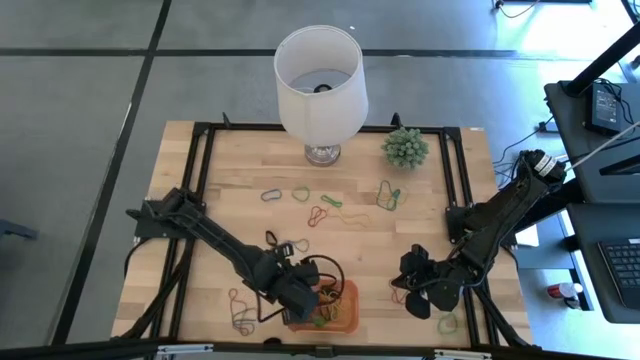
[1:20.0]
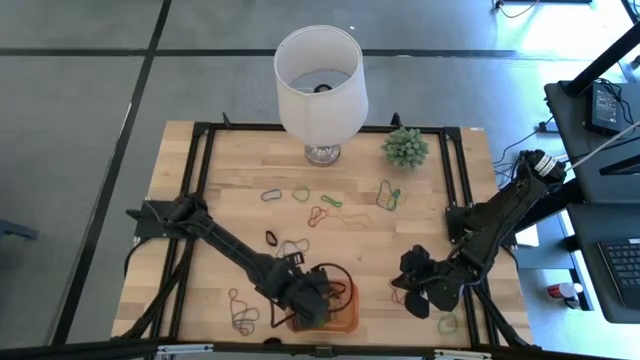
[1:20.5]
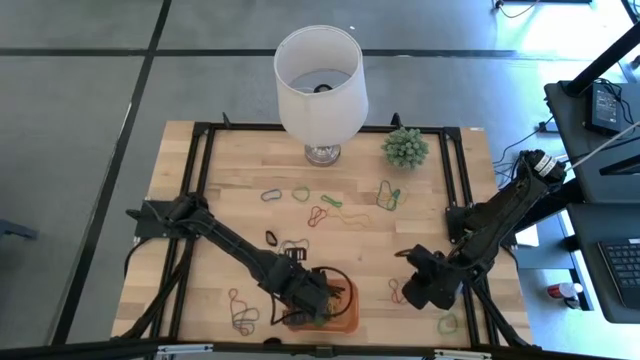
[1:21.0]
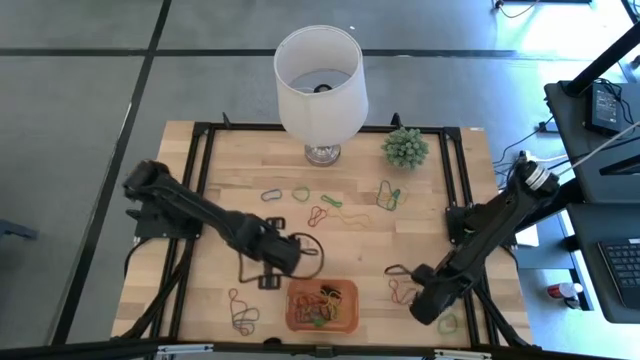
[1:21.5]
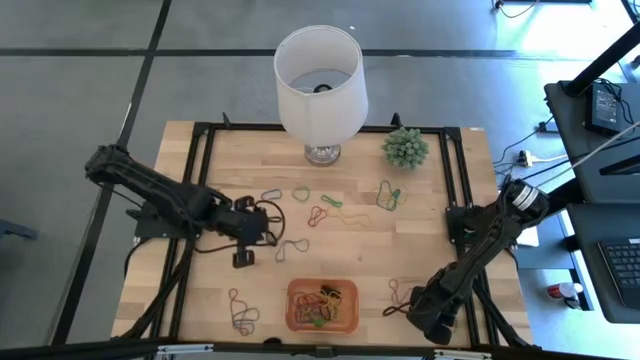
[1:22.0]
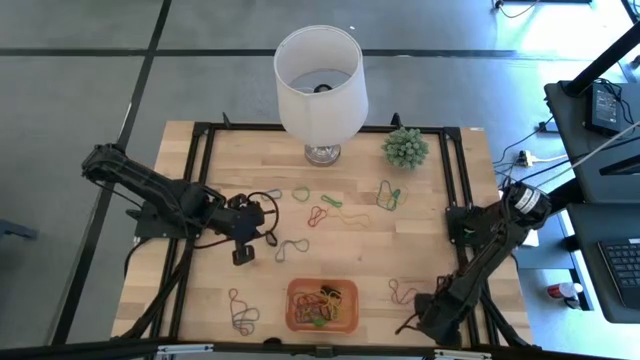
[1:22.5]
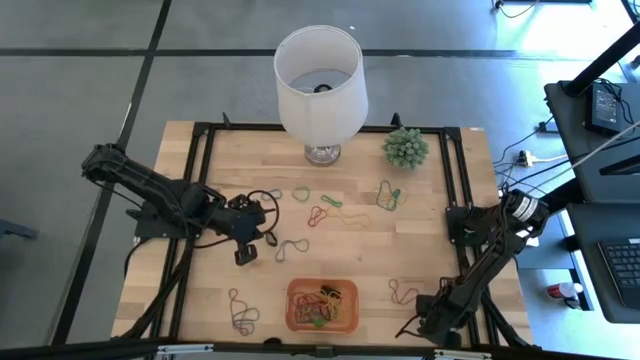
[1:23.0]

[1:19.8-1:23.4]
Task: Pick and place rubber bands into bin
Put the green rubber band into the orange bin

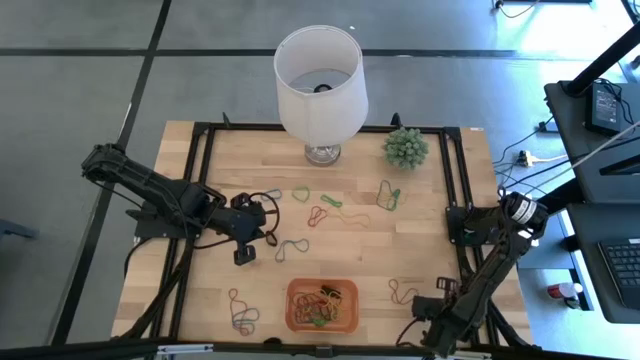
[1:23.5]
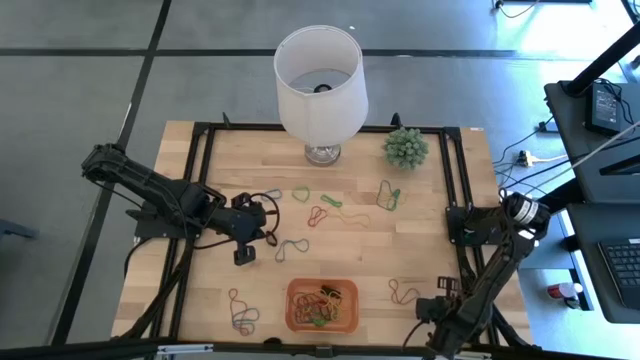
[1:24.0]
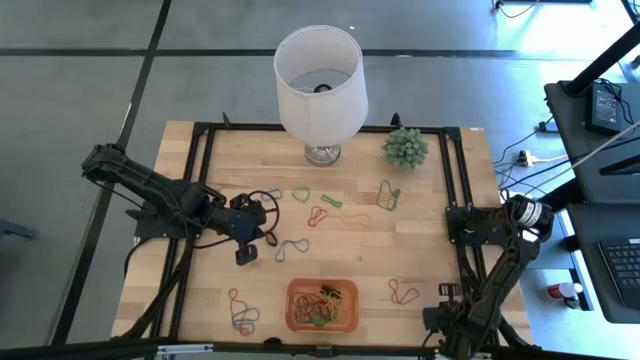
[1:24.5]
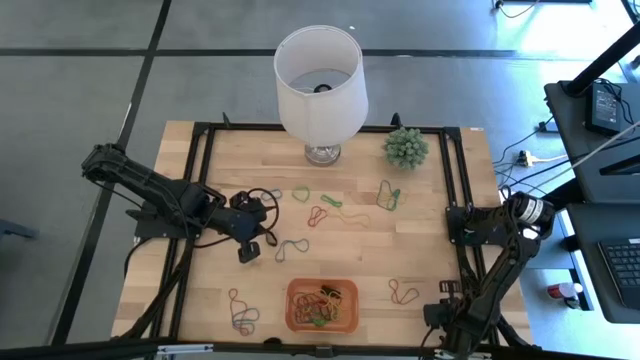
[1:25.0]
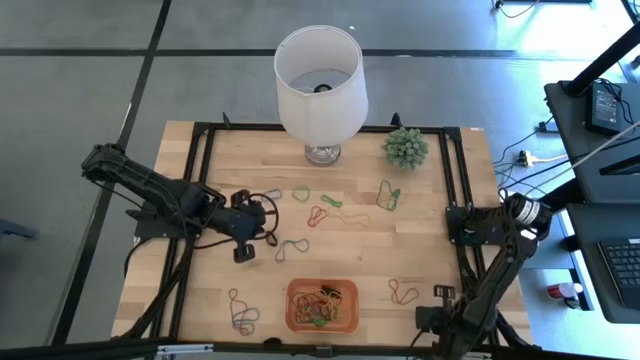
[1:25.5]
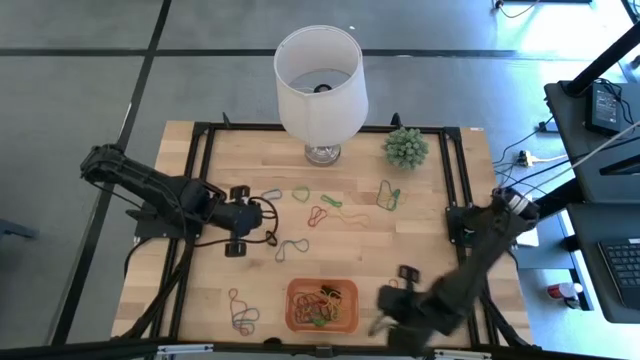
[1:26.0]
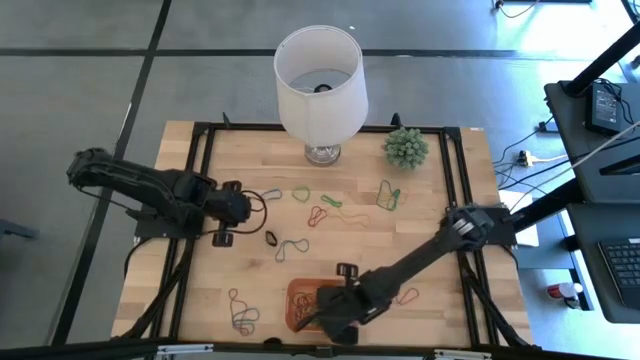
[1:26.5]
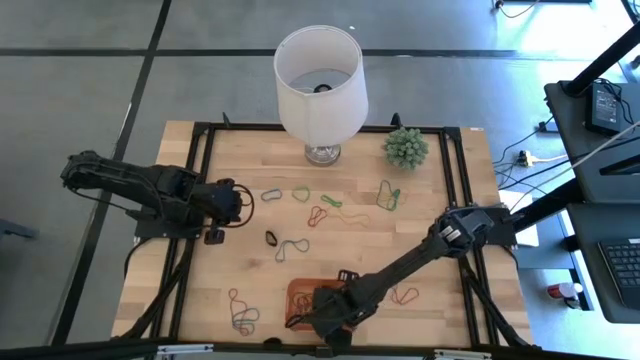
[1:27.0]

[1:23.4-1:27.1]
Put the green rubber band into the orange bin

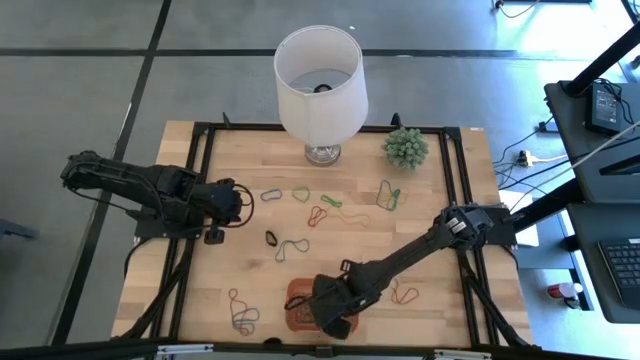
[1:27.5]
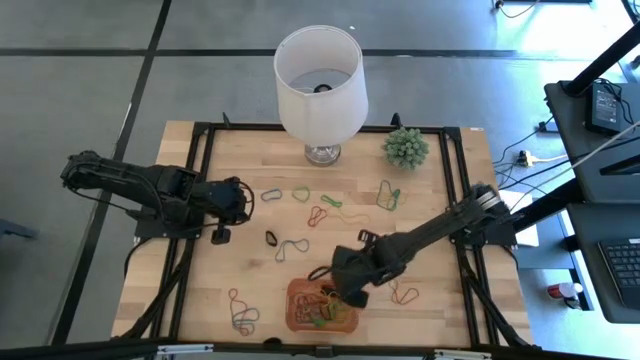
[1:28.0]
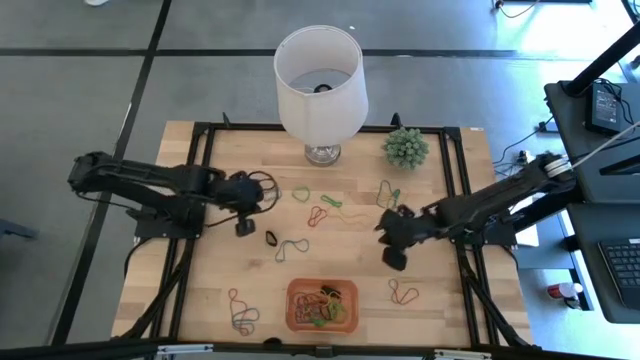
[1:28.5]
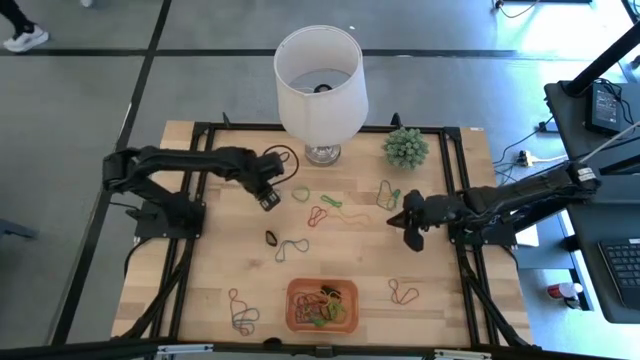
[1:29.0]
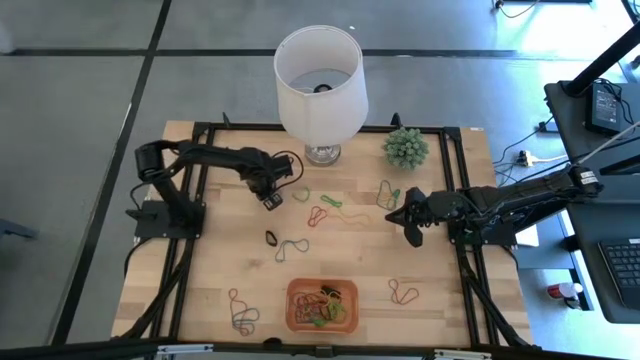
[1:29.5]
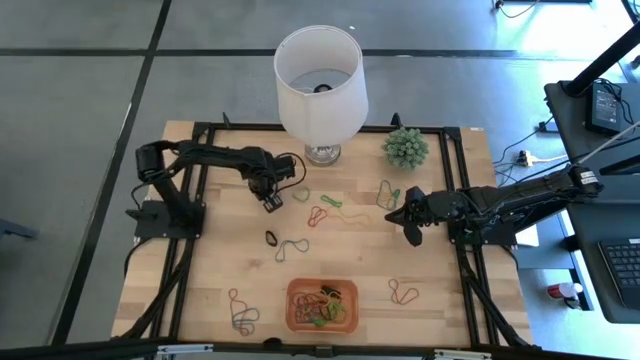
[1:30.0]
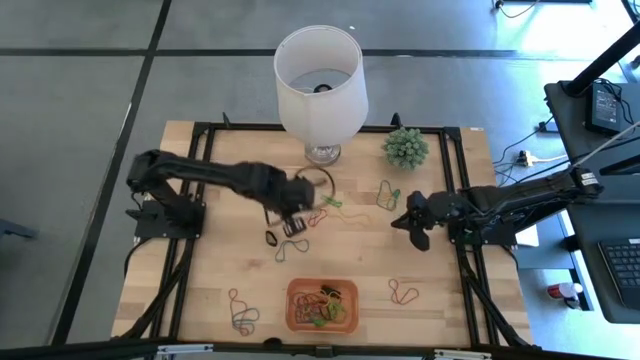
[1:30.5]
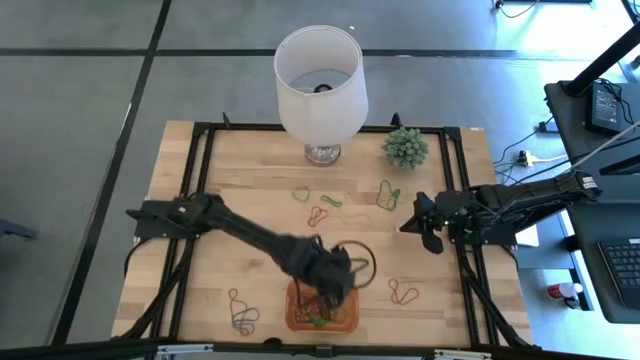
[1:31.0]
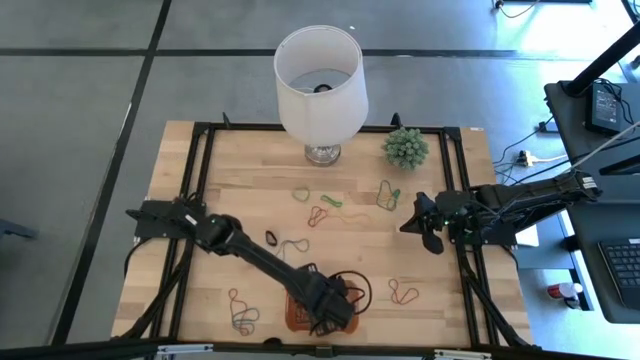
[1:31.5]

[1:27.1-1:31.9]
Put the blue rubber band into the orange bin

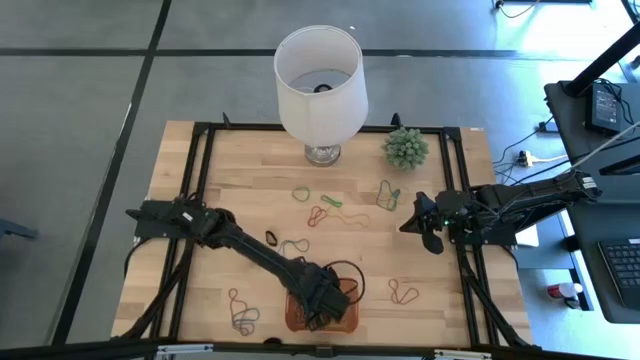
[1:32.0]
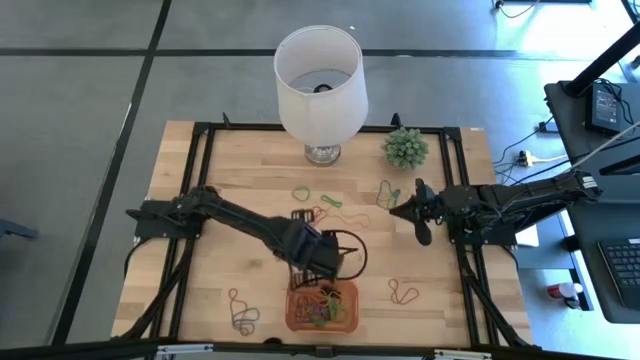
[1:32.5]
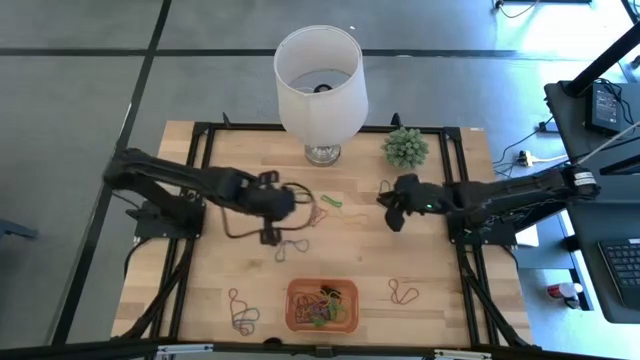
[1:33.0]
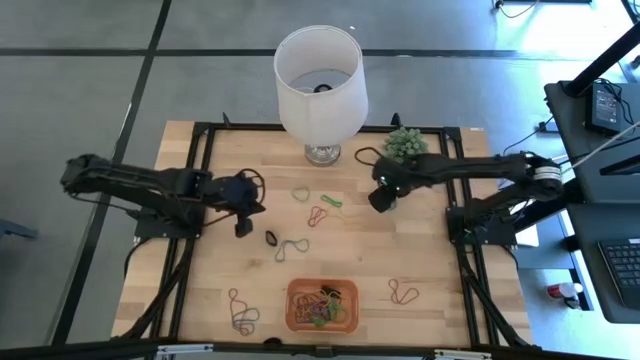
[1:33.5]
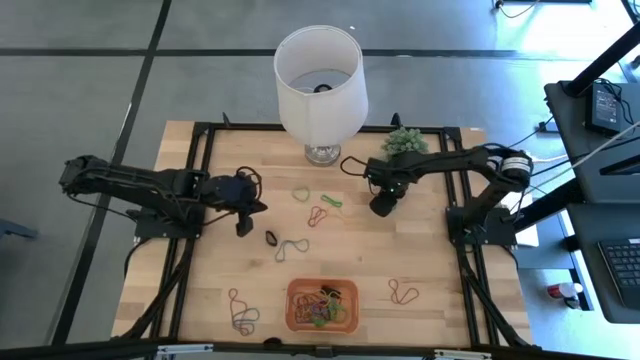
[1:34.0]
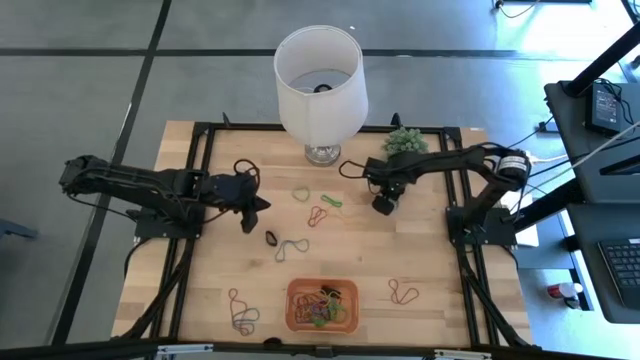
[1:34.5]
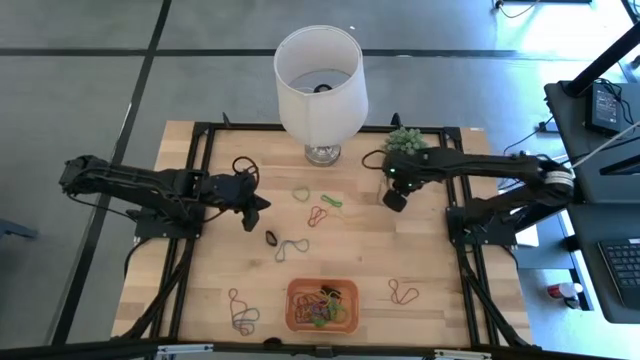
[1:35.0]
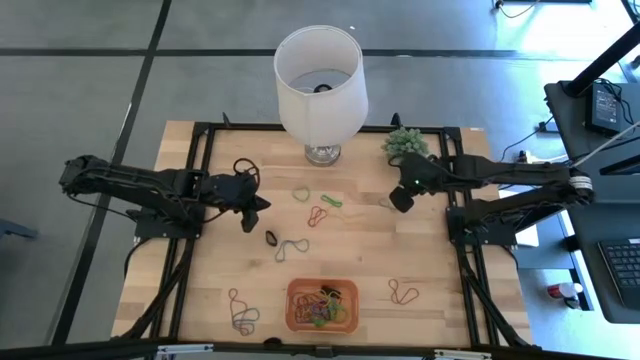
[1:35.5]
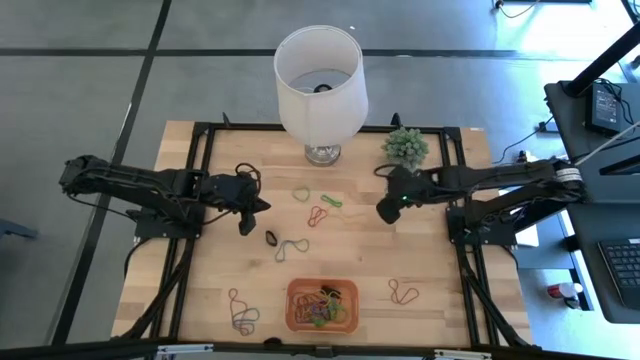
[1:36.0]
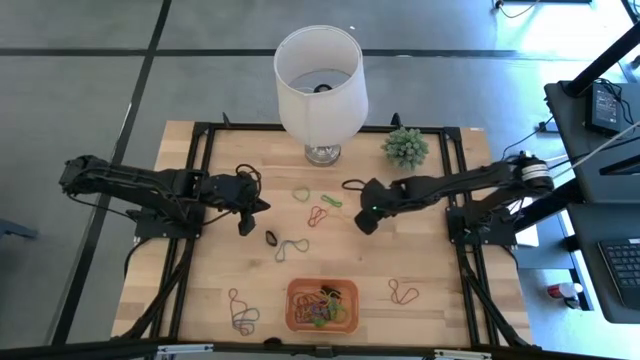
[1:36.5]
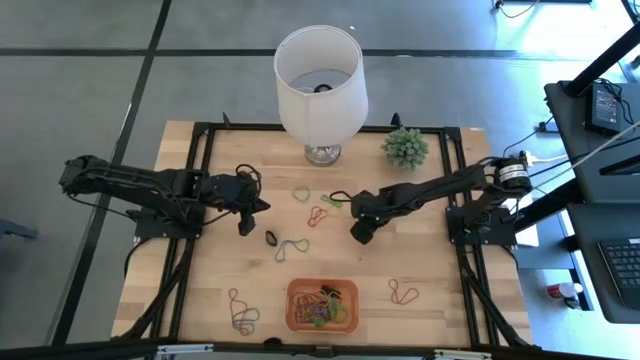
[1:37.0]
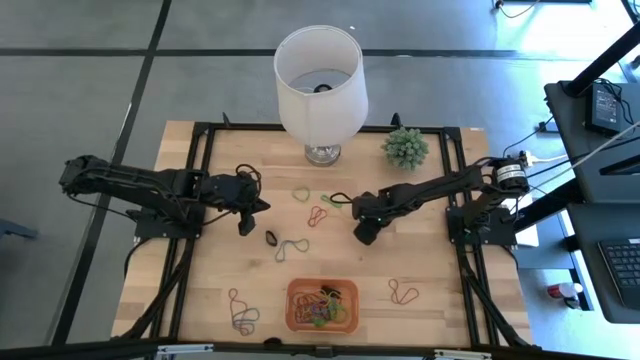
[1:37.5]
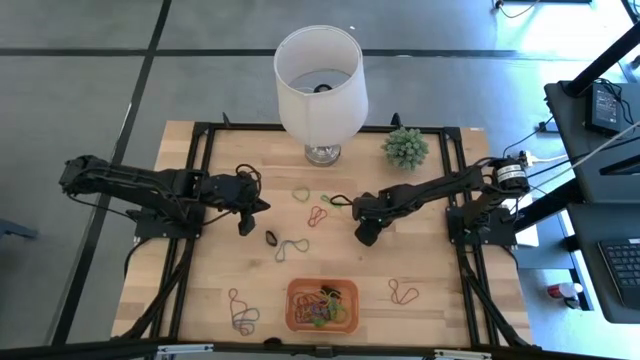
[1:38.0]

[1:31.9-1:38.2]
Put the yellow rubber band into the orange bin

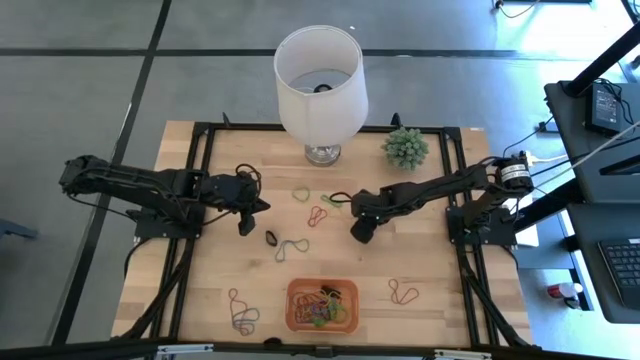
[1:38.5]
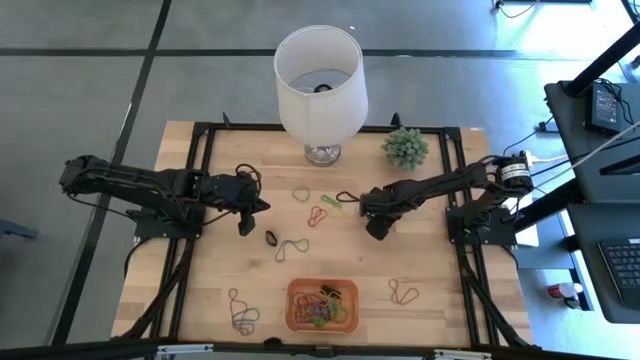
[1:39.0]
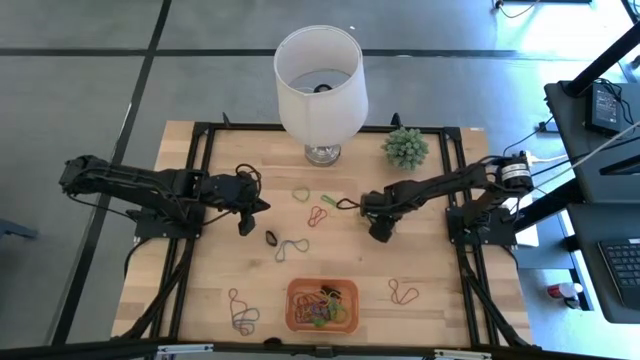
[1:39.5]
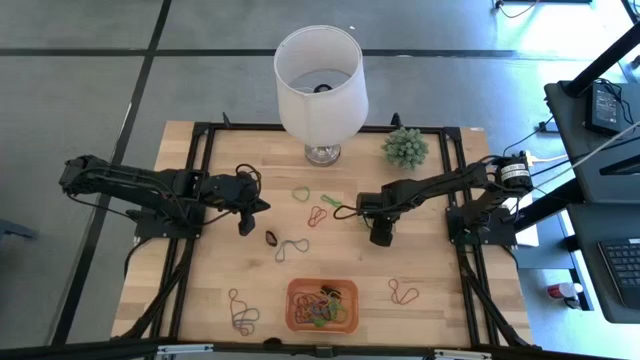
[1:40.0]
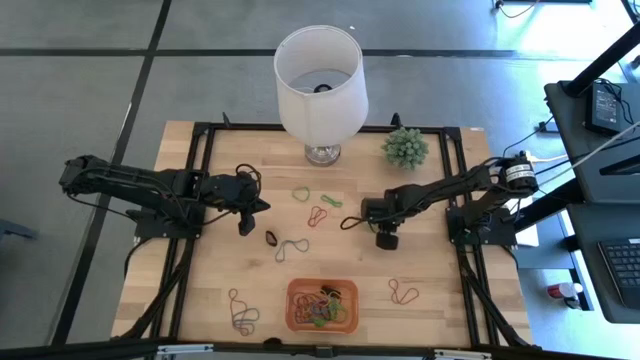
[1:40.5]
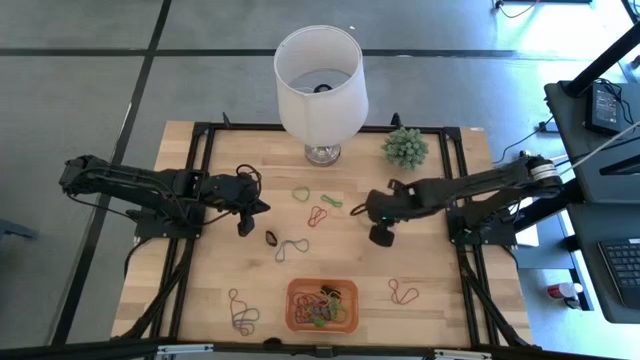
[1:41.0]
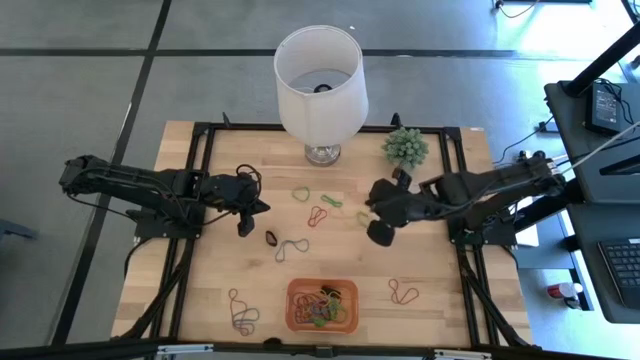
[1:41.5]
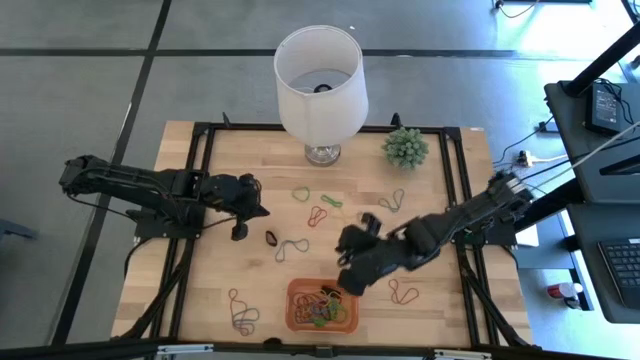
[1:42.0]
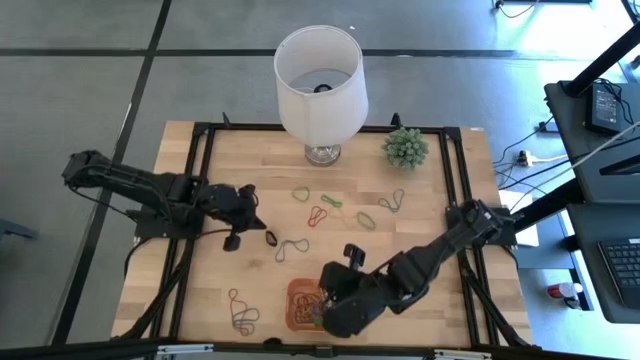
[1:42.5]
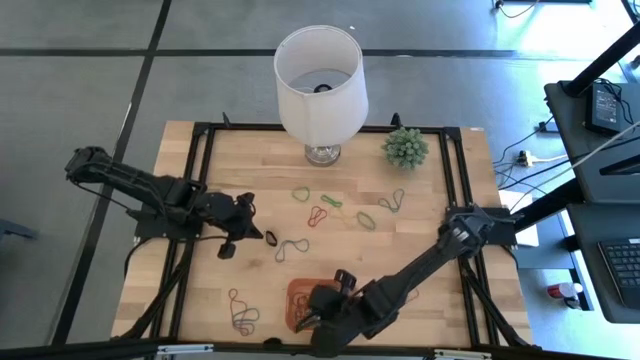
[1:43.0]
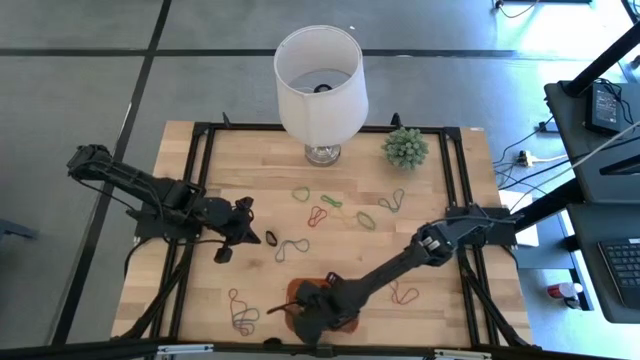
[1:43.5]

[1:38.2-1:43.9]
Put the yellow rubber band into the orange bin
